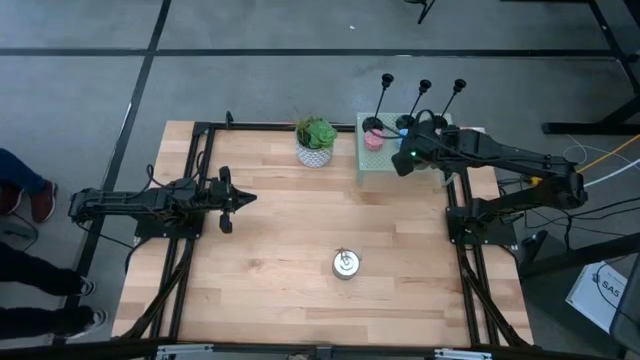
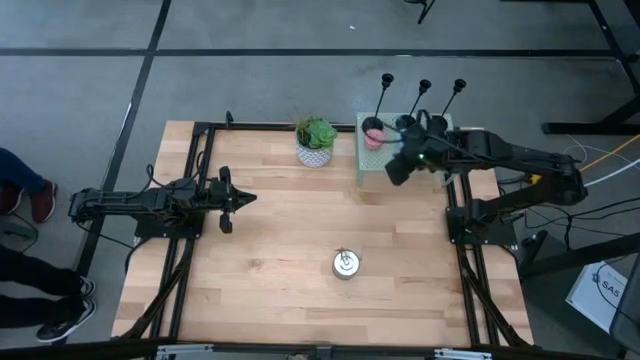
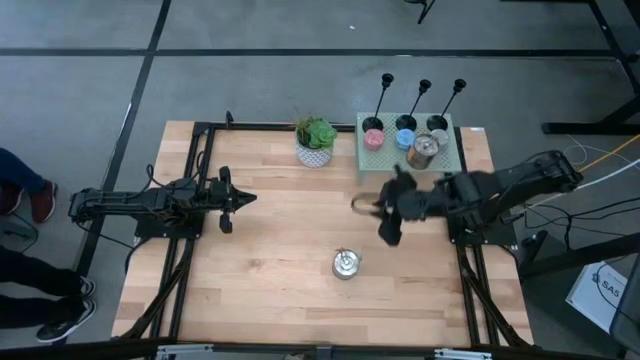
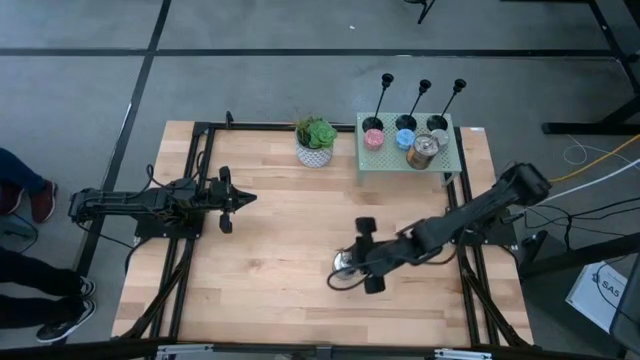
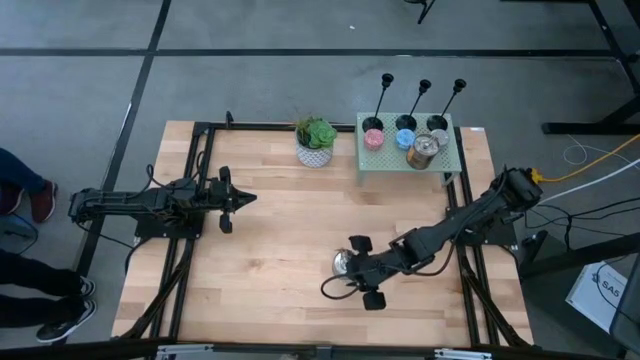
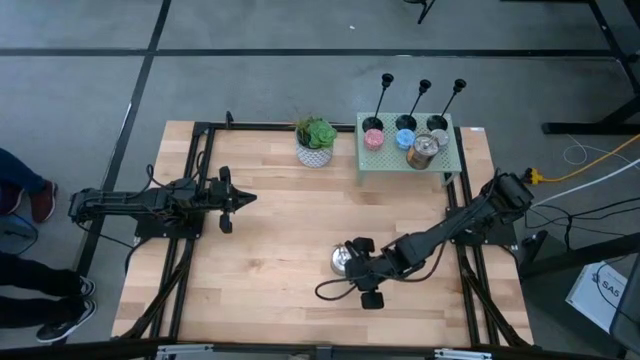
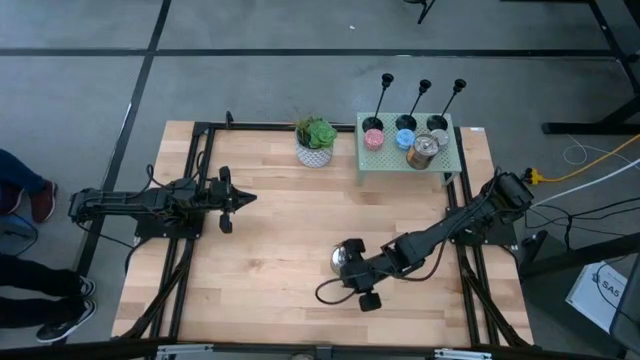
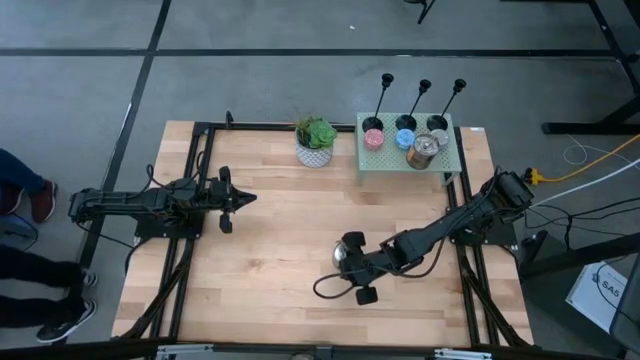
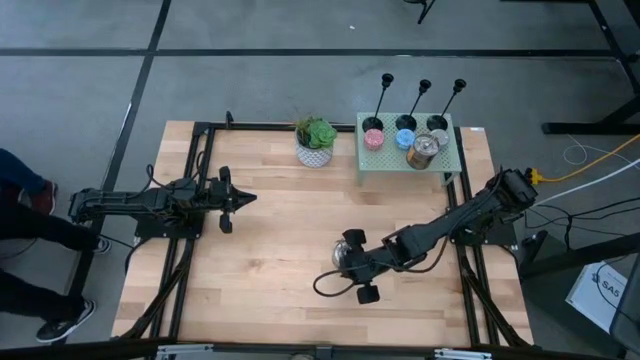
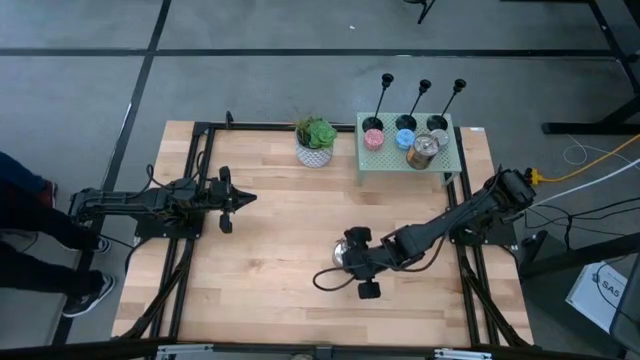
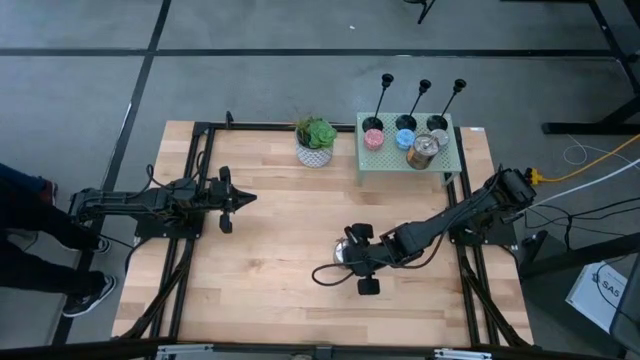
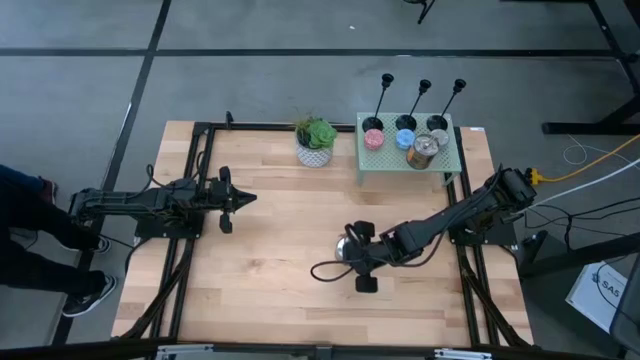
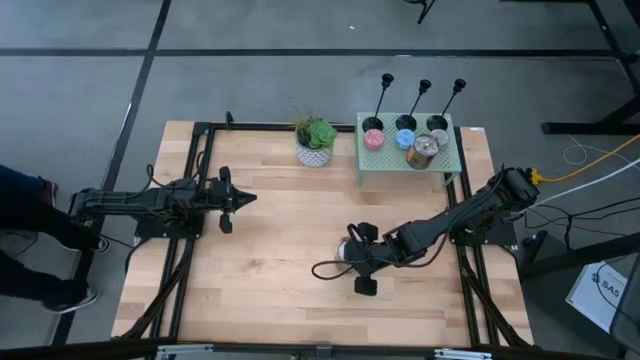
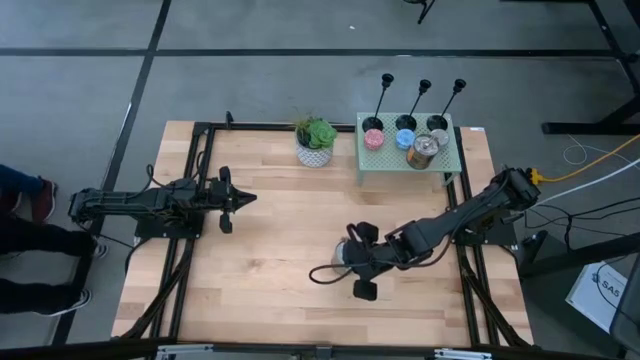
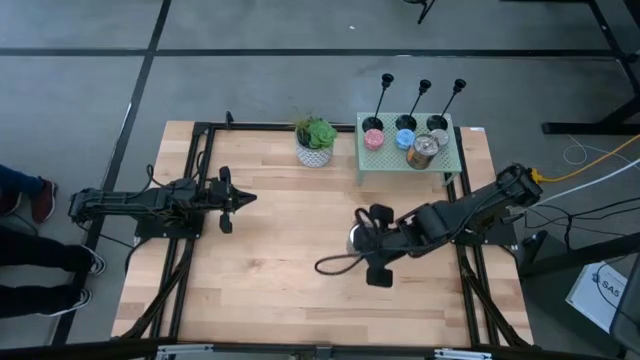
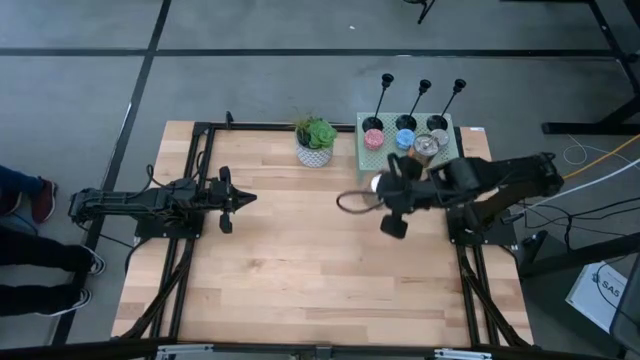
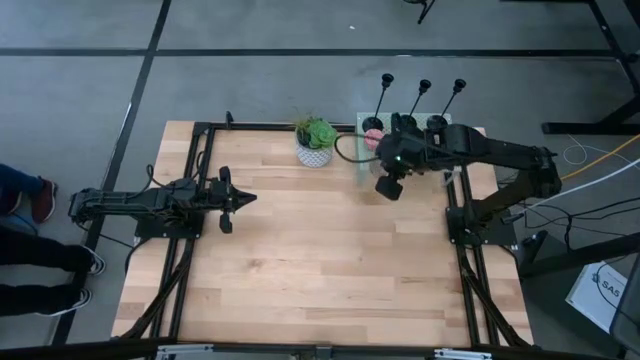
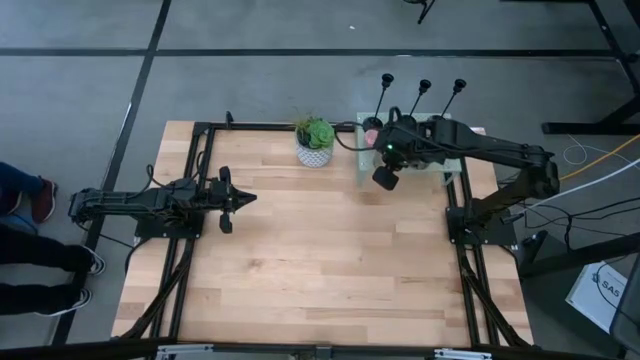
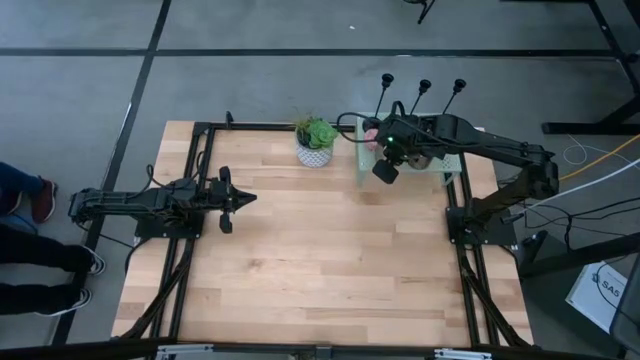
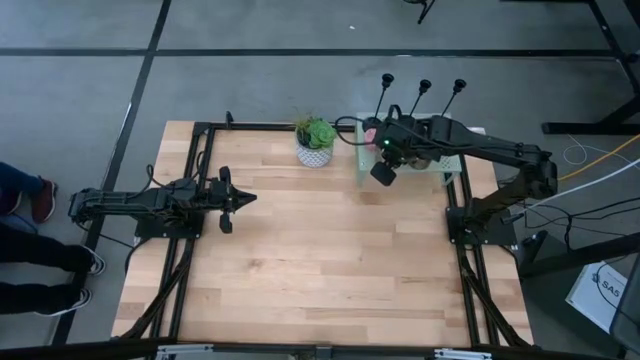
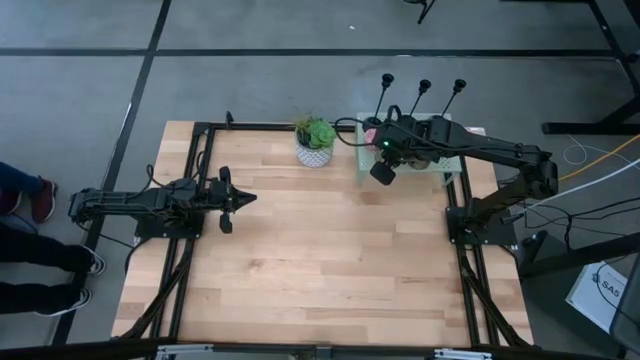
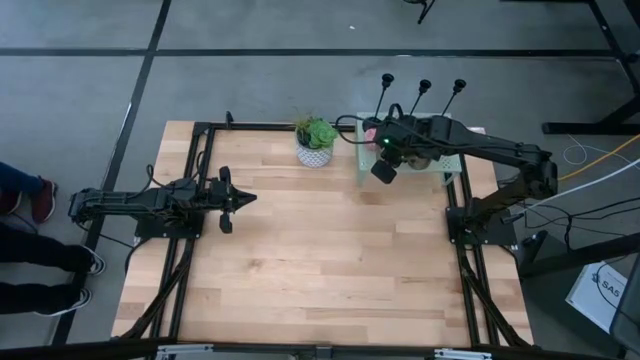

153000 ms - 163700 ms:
Task: Pick & Place candle stick holders
Put the silver scented candle can and aligned with other silver scented candle can on the shelf

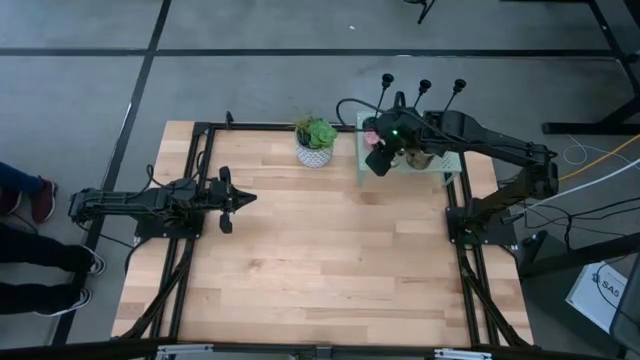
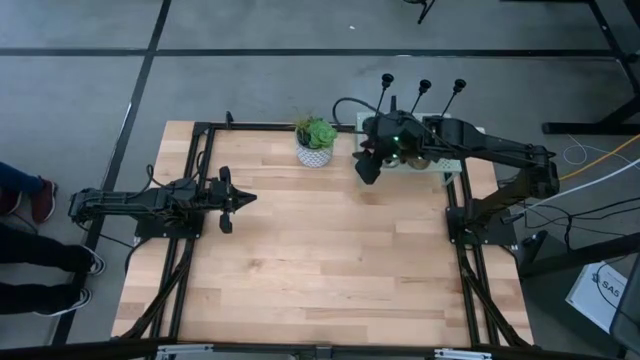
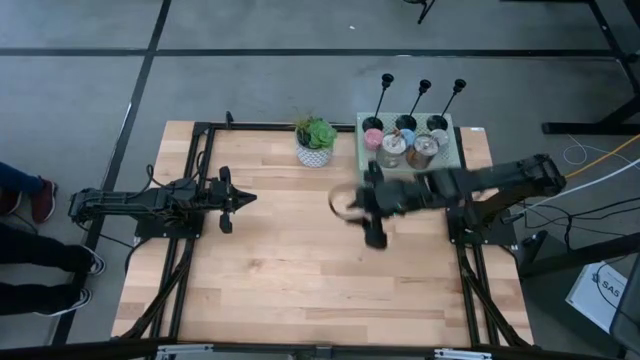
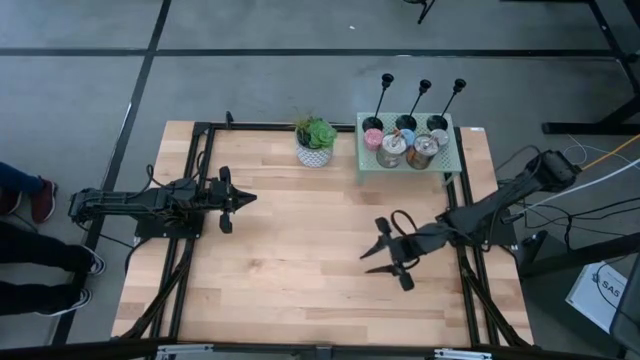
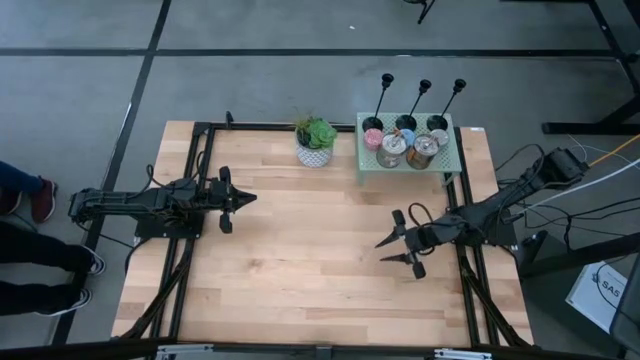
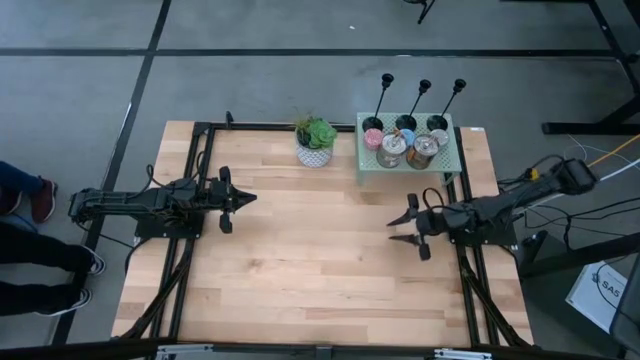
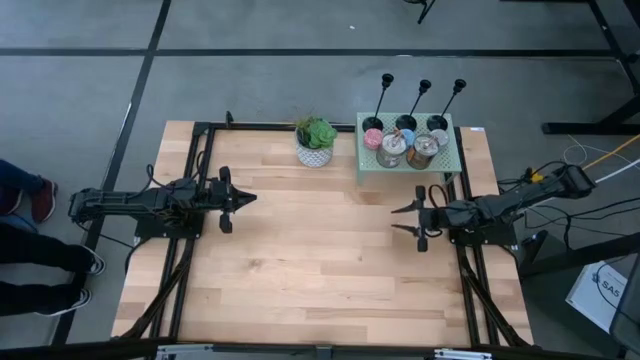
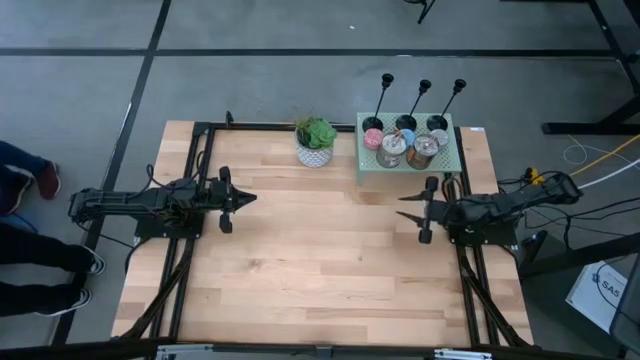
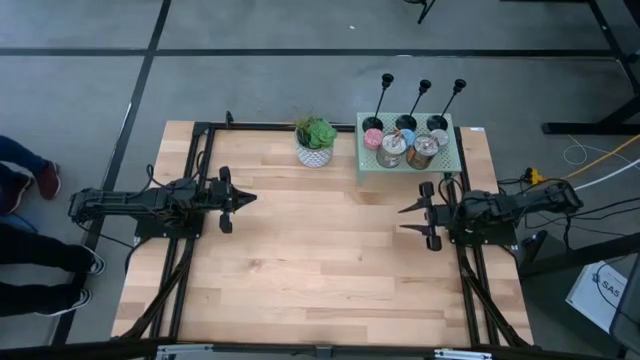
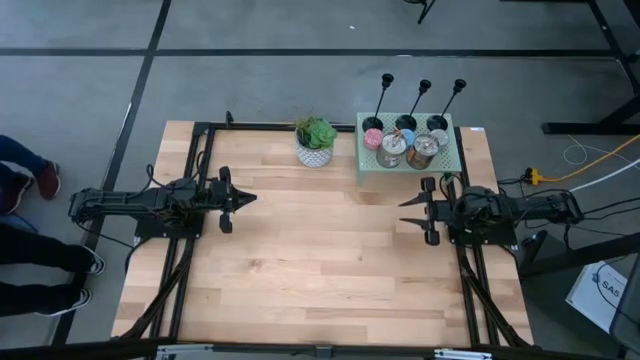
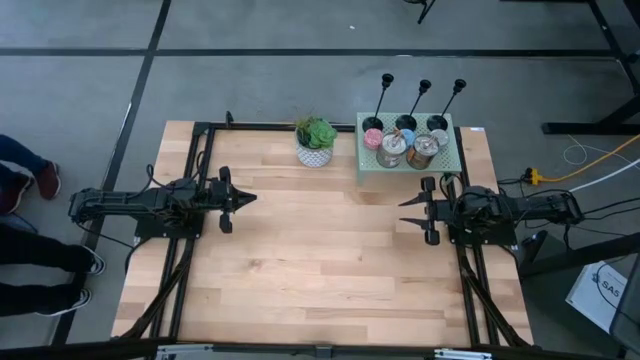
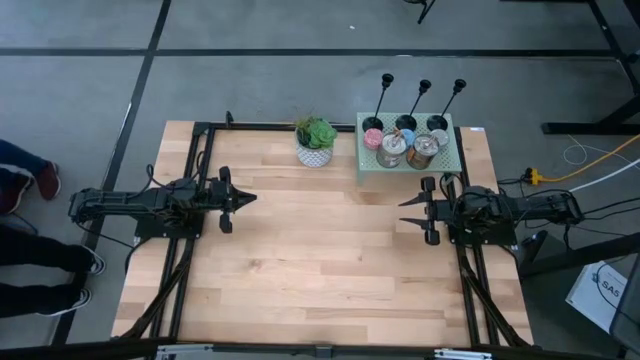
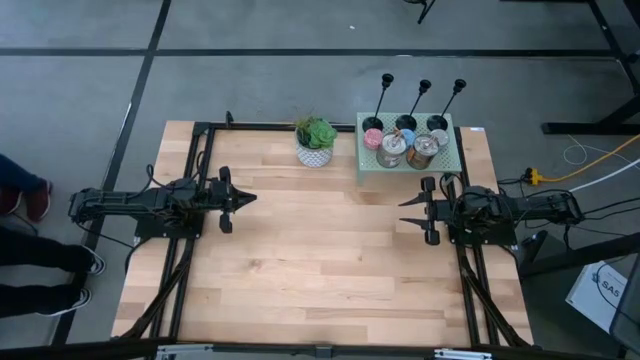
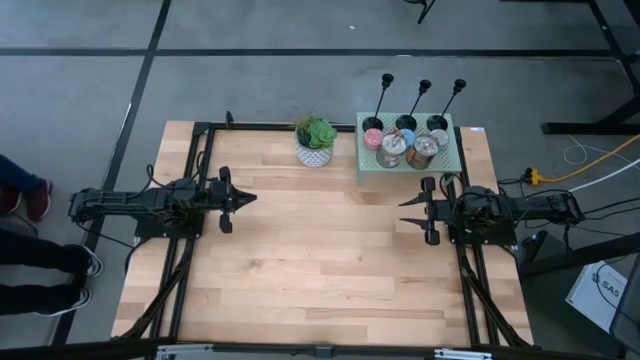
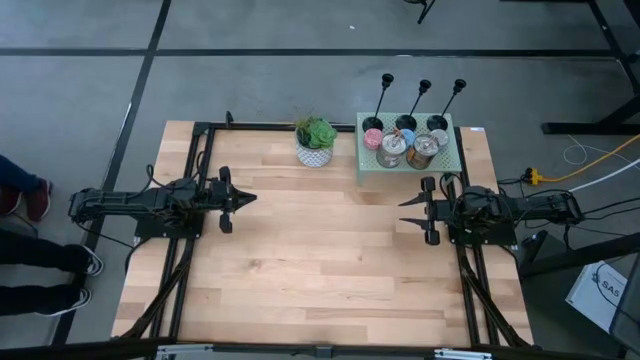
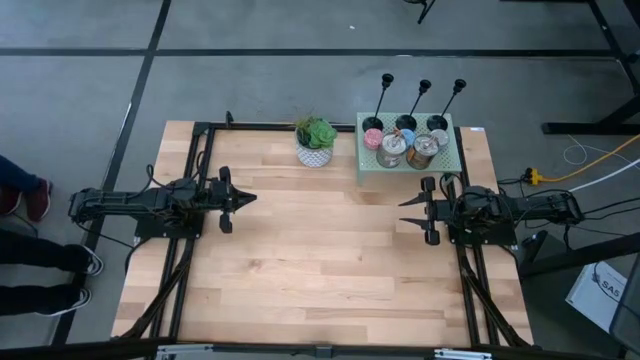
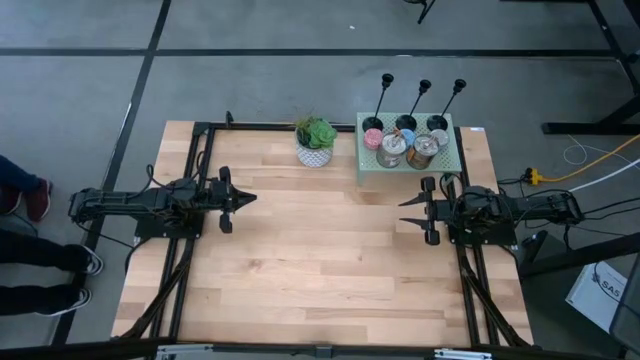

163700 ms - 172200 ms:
Return to Home Position

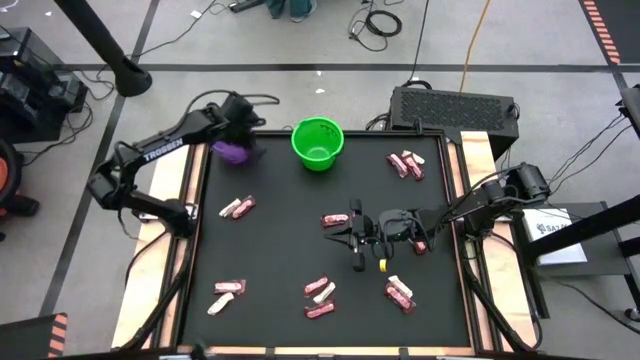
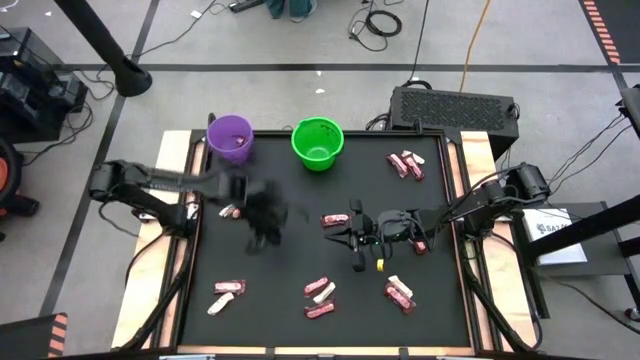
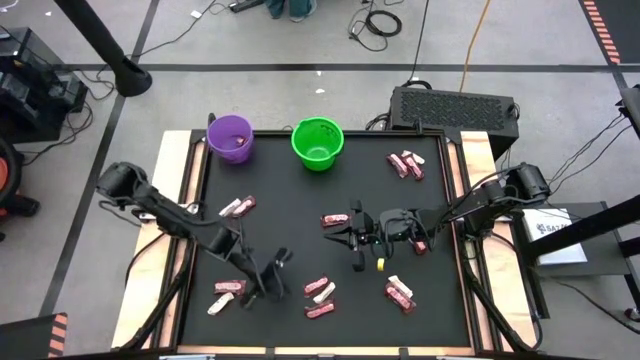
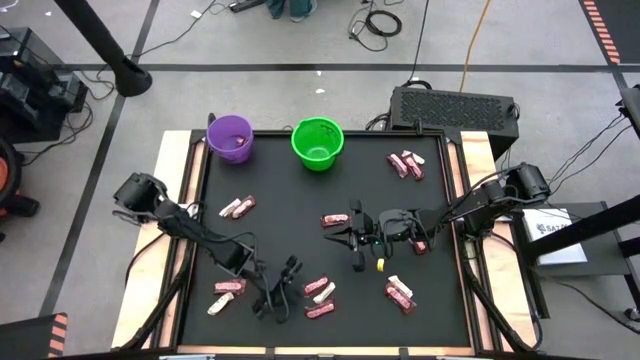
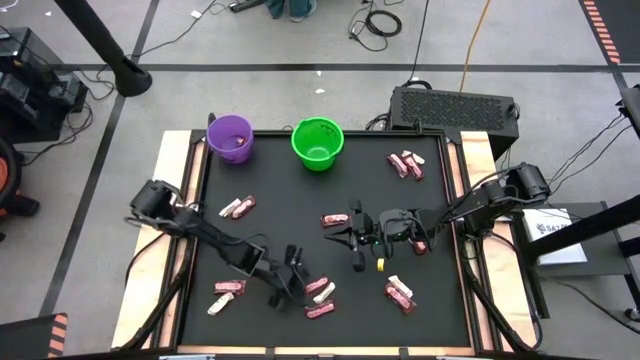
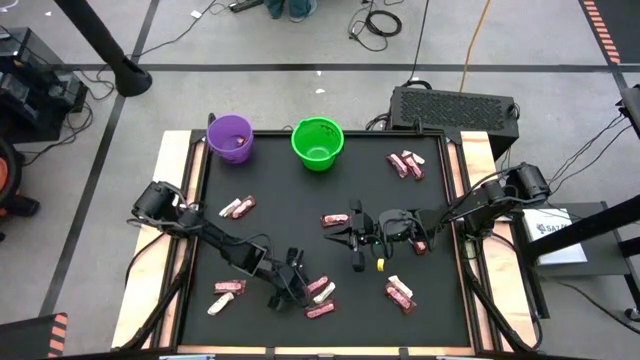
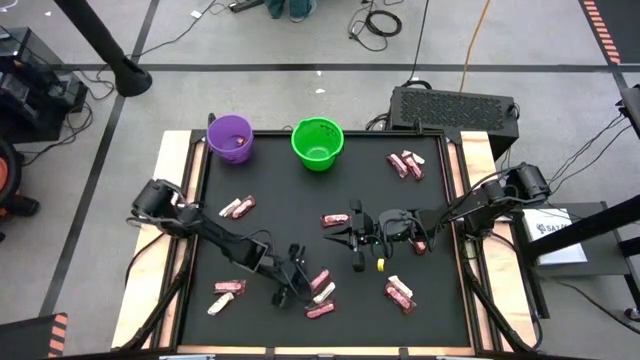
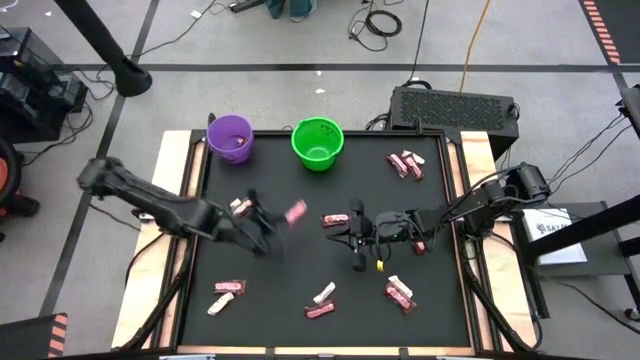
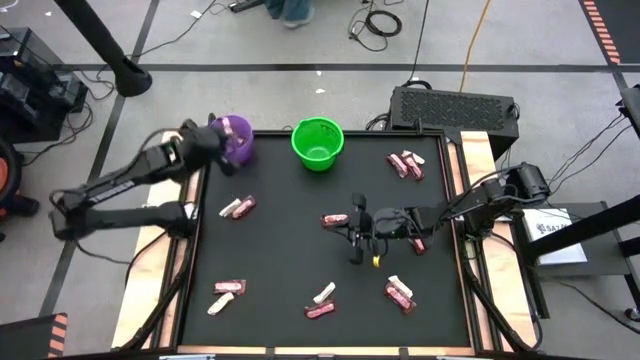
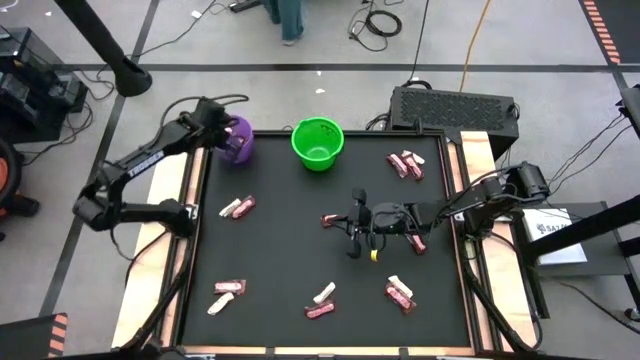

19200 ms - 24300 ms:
Task: Sort candy by brand, put in halloween buckets
Put the brown chocolate bar into the purple bucket
